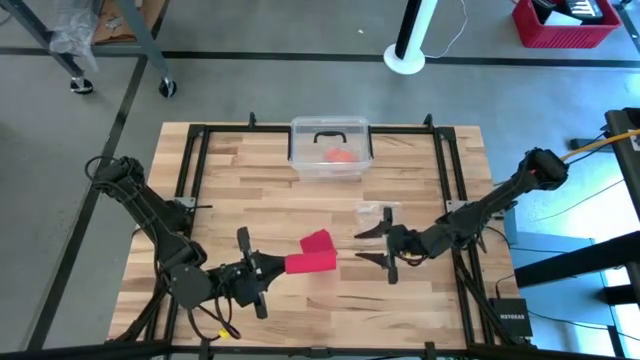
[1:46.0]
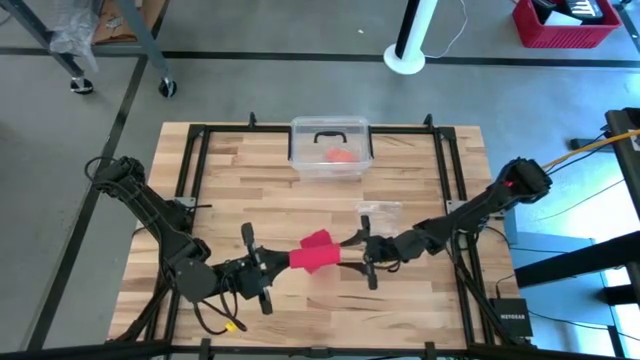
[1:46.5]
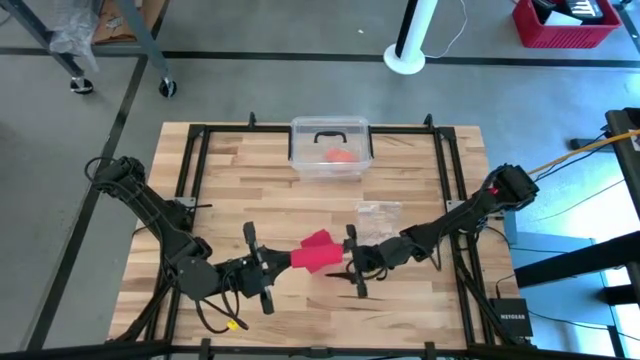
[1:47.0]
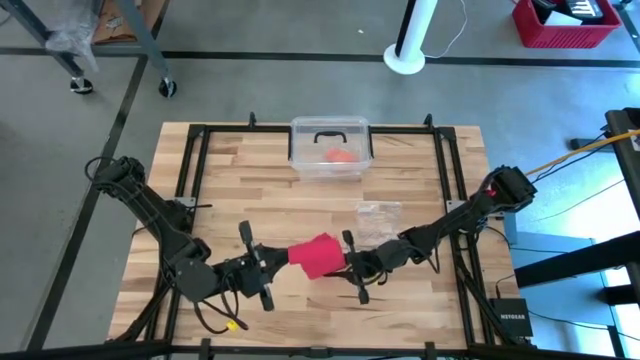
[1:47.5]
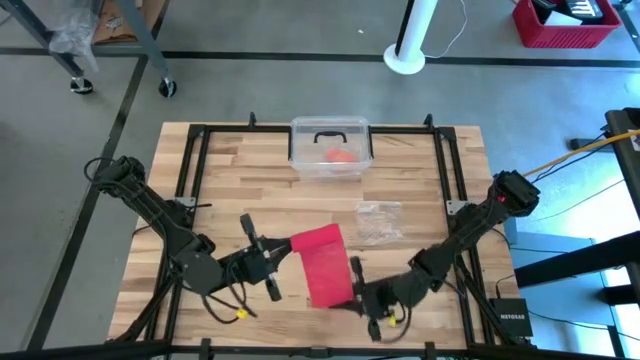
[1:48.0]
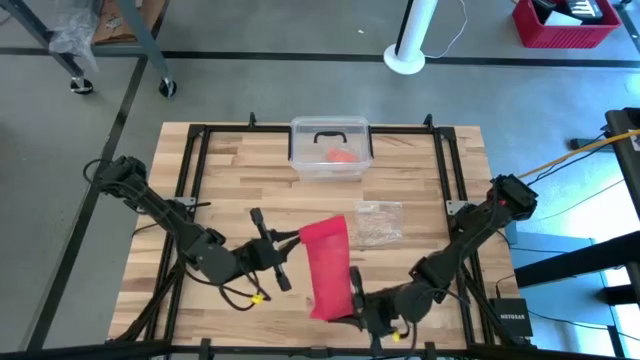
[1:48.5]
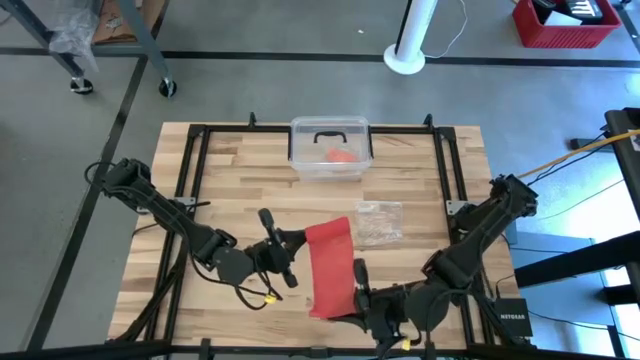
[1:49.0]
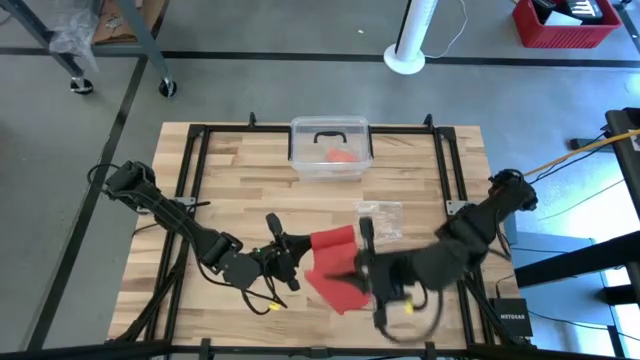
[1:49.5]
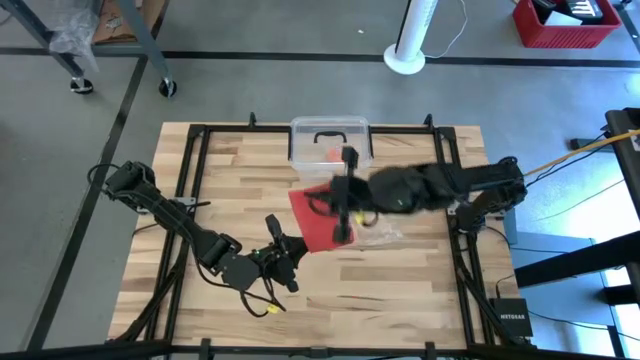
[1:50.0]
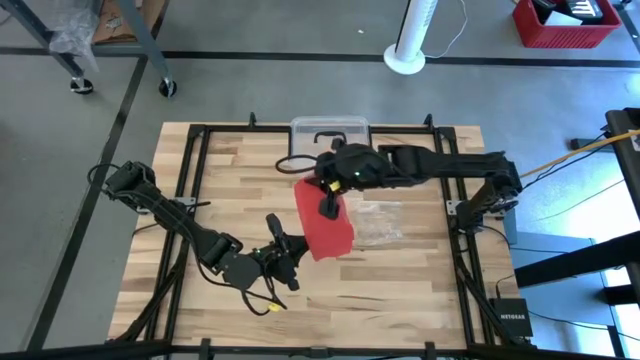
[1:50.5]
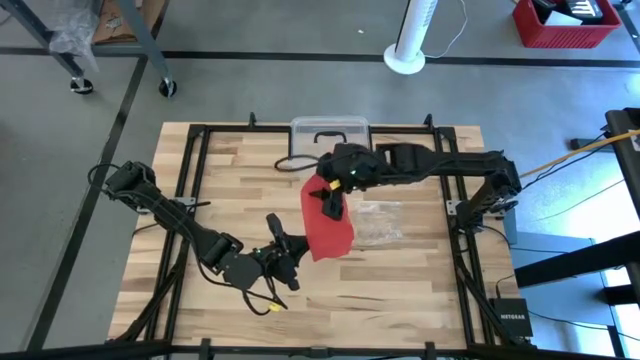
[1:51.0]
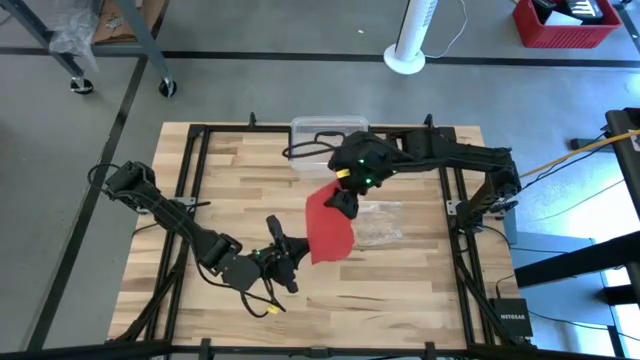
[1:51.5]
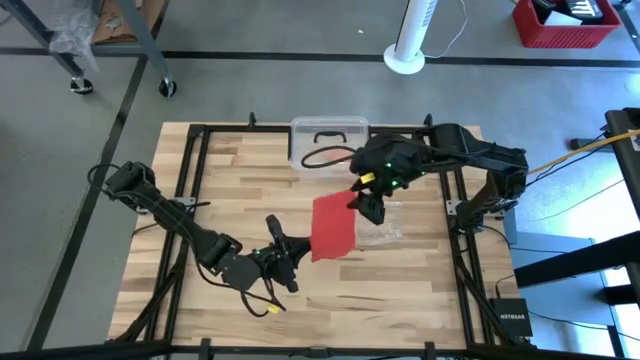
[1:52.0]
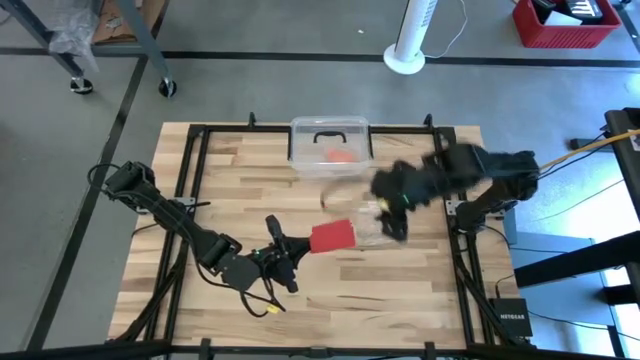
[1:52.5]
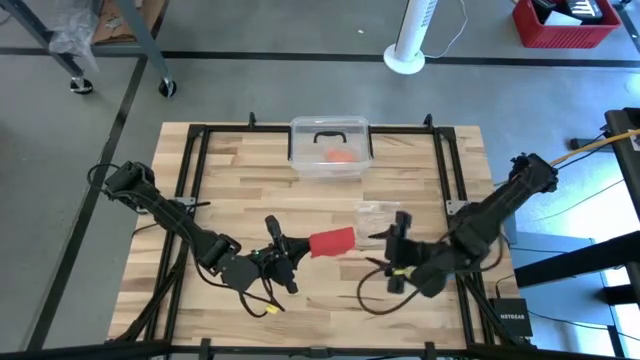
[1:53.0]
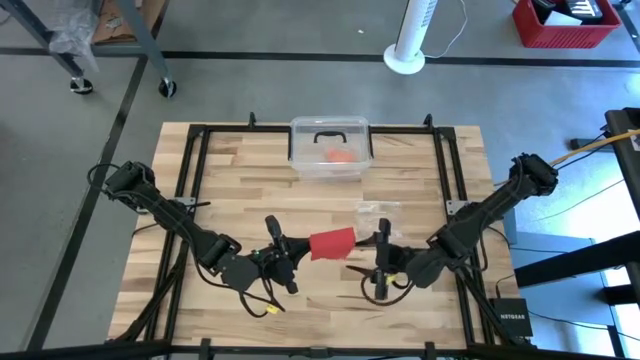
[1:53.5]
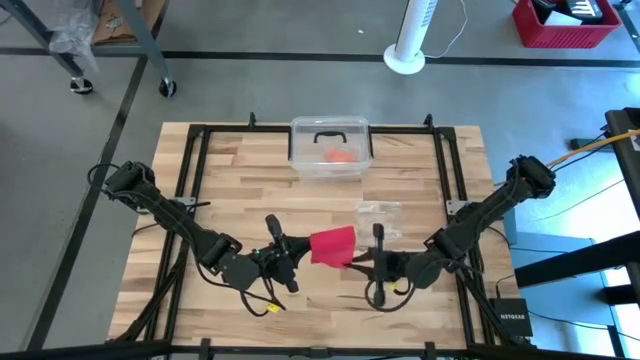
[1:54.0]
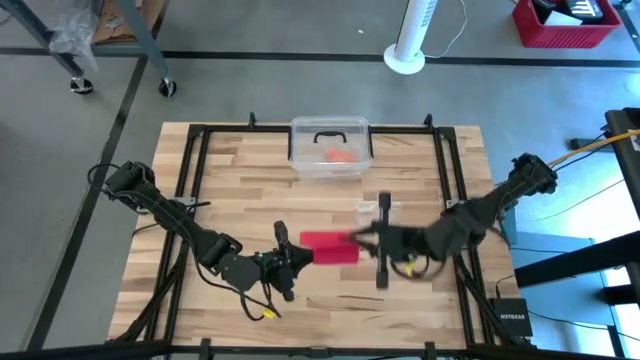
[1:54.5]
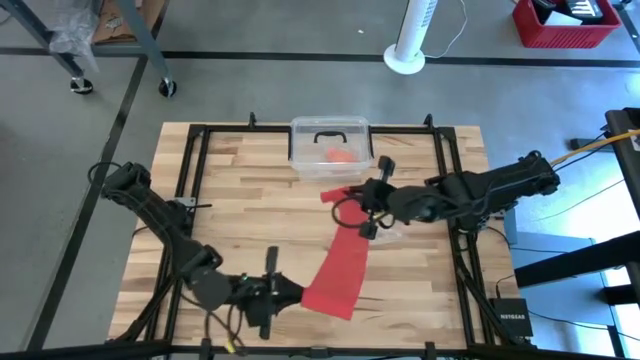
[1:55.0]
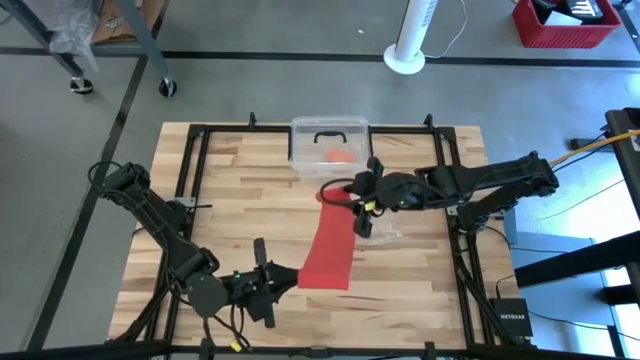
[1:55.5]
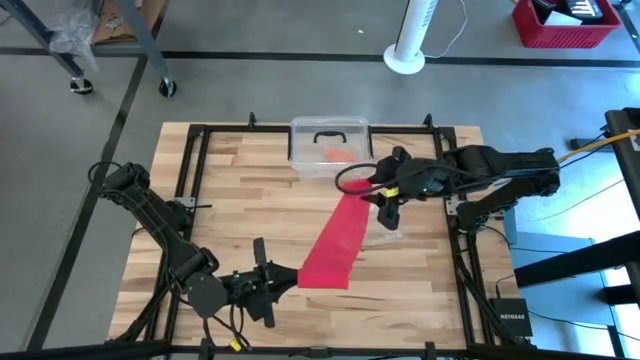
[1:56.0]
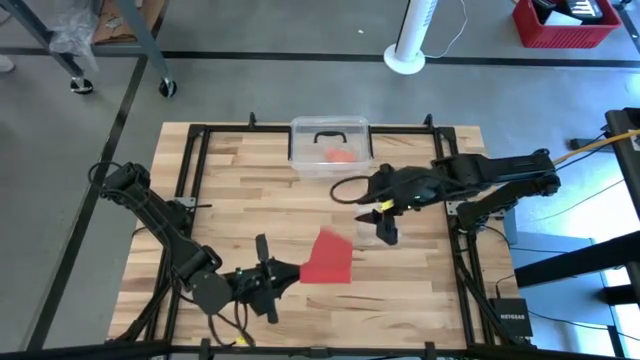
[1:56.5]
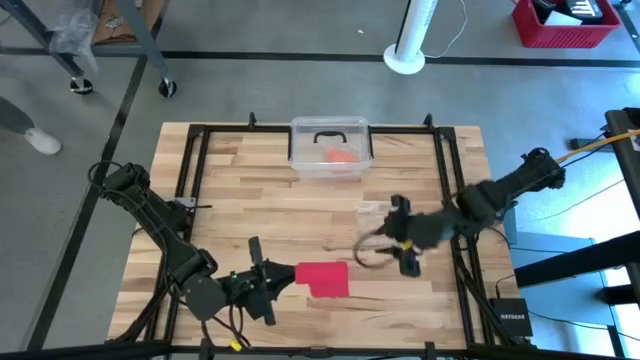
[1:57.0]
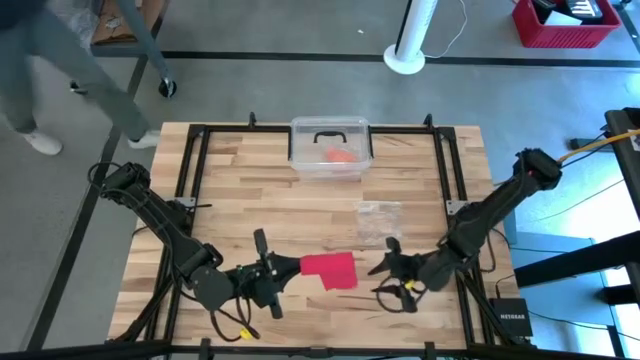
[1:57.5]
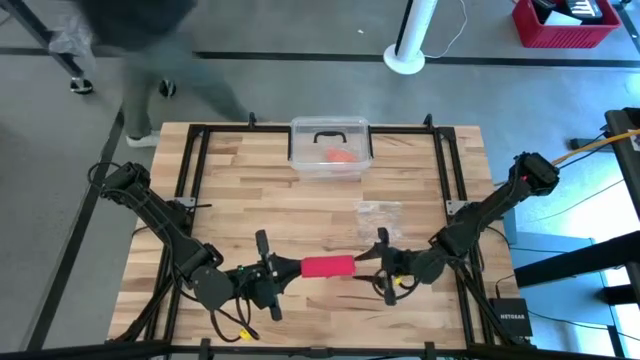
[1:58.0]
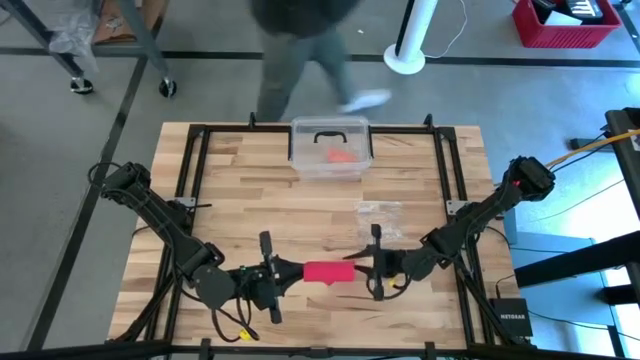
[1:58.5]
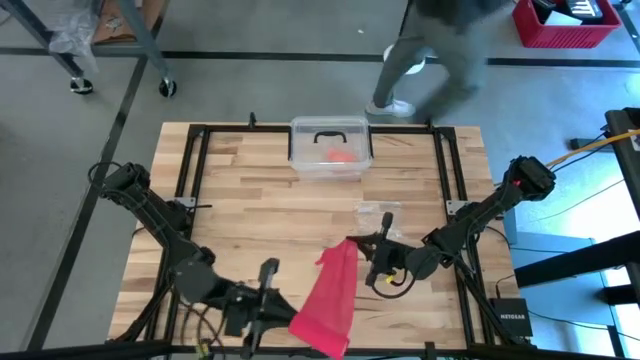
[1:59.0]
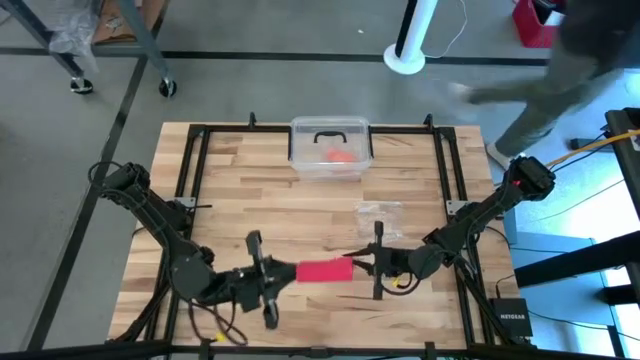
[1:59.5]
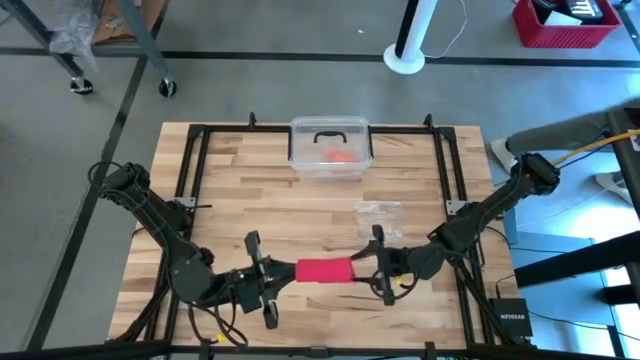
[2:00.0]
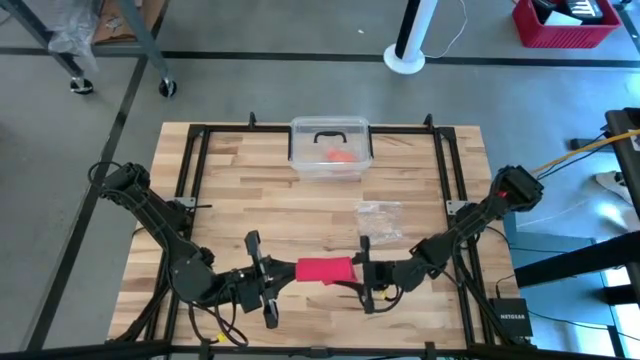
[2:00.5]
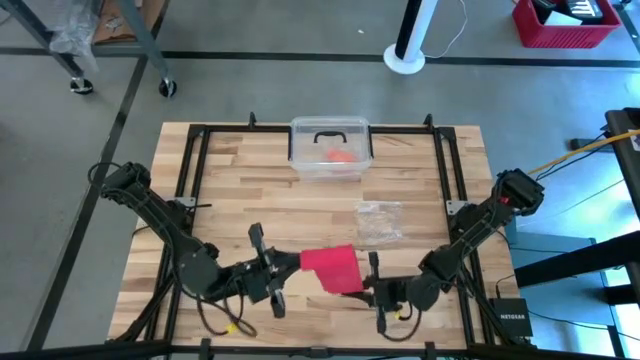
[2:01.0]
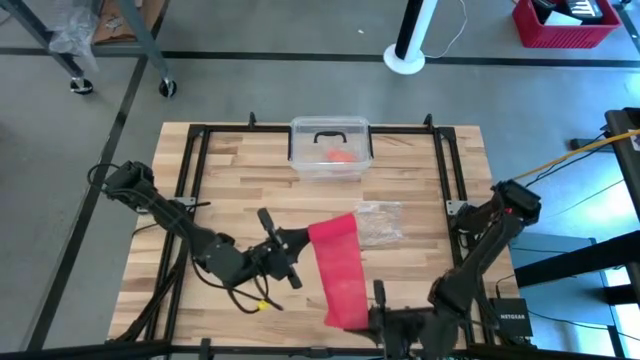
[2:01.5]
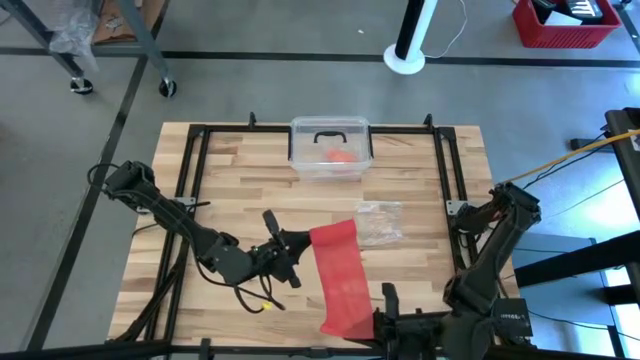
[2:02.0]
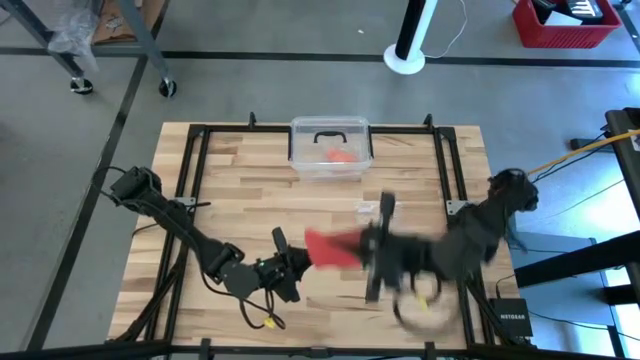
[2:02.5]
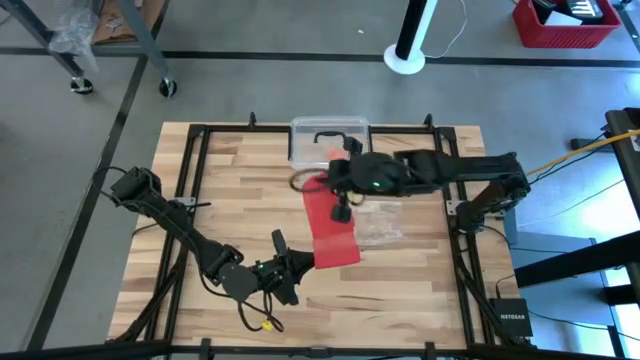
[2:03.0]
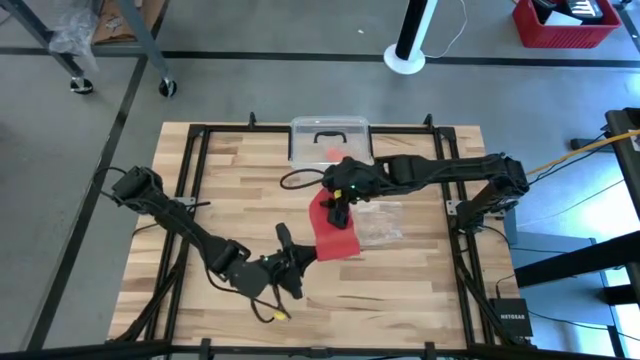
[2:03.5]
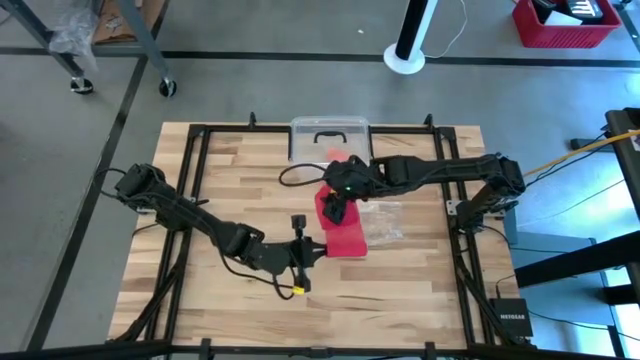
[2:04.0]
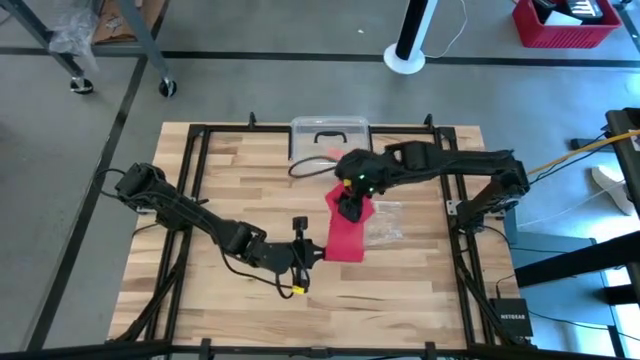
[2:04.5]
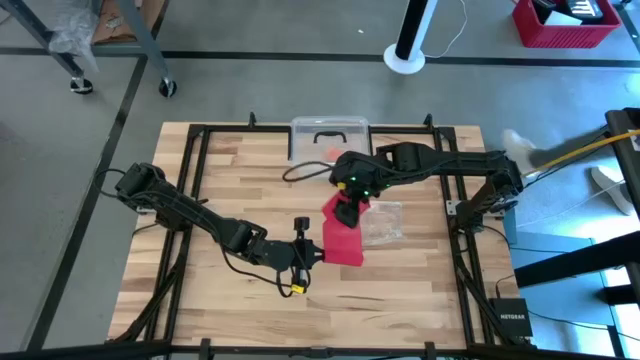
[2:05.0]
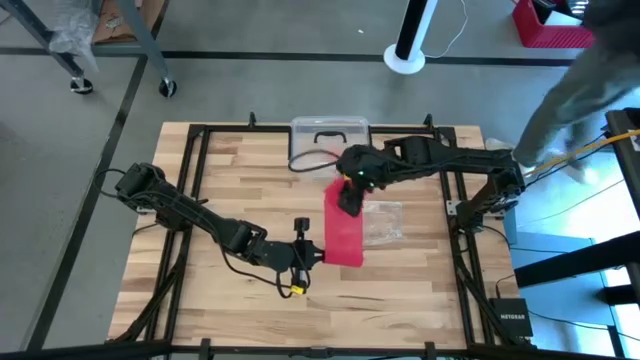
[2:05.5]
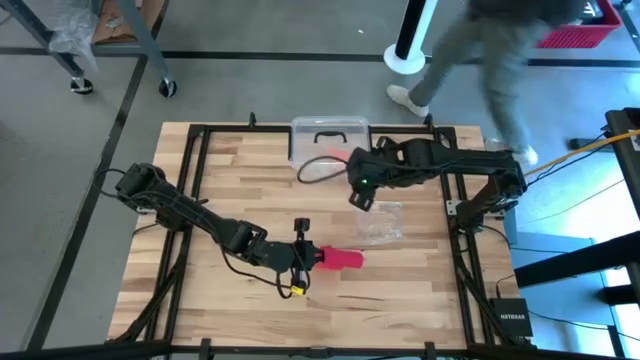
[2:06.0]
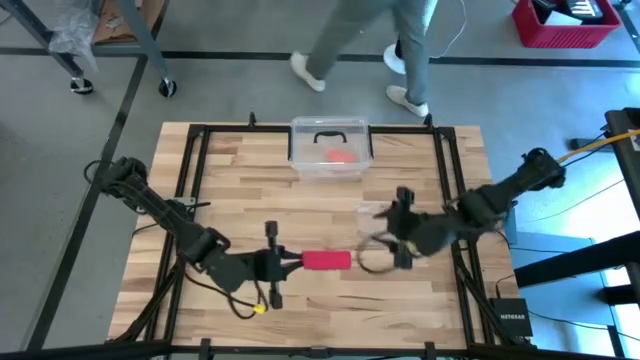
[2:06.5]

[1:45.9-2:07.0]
Task: Roll bandage
Roll the red bandage
